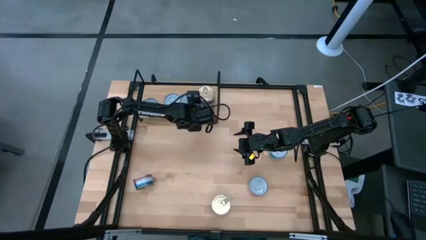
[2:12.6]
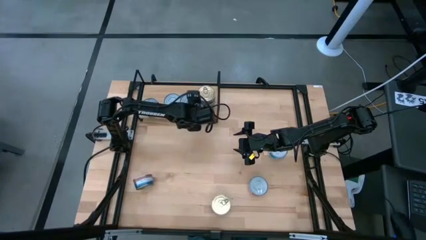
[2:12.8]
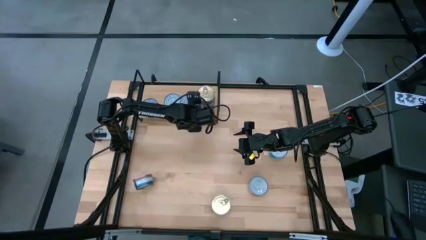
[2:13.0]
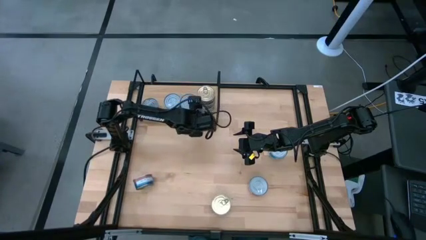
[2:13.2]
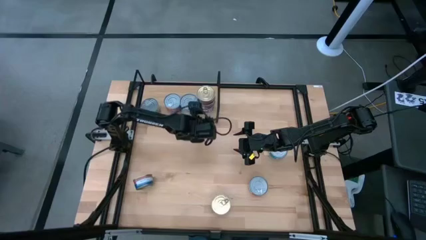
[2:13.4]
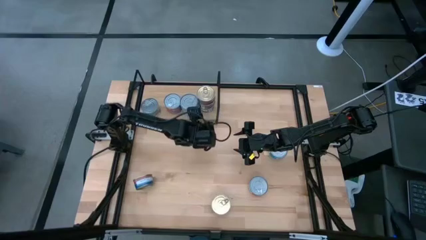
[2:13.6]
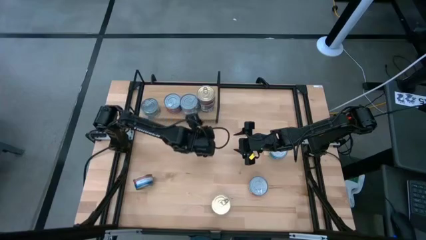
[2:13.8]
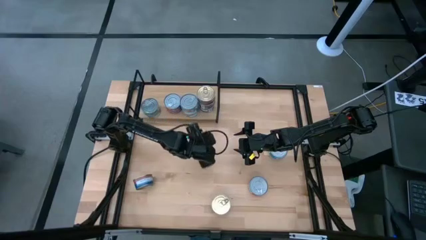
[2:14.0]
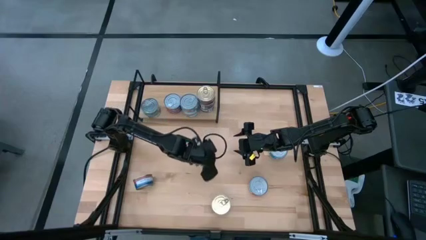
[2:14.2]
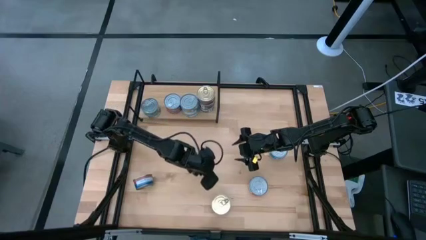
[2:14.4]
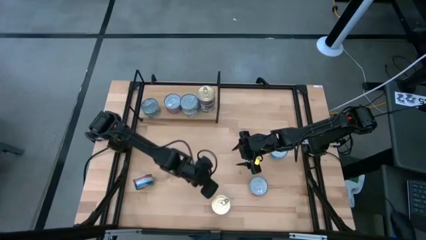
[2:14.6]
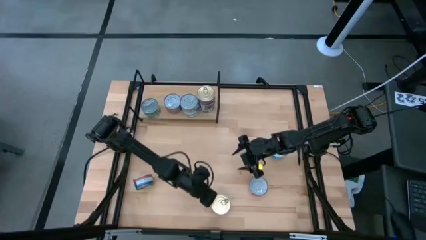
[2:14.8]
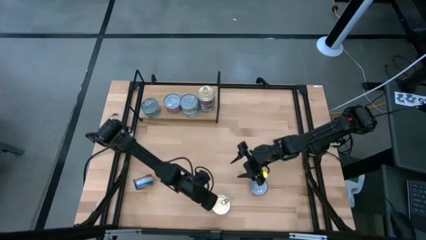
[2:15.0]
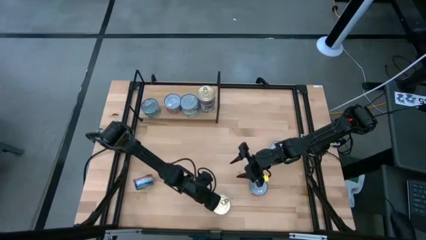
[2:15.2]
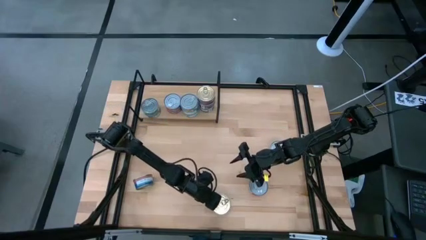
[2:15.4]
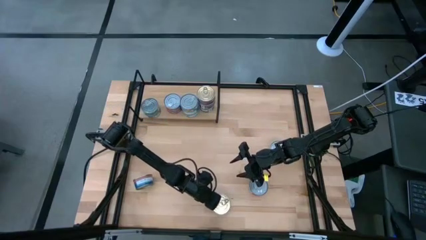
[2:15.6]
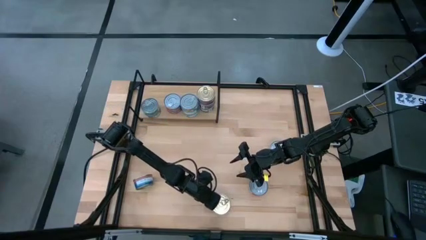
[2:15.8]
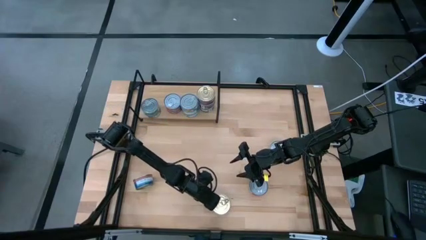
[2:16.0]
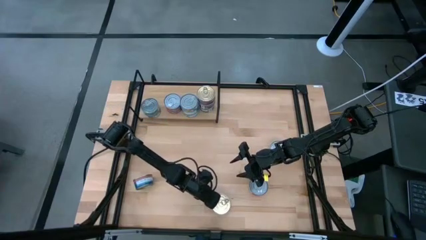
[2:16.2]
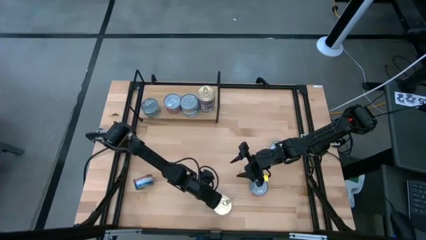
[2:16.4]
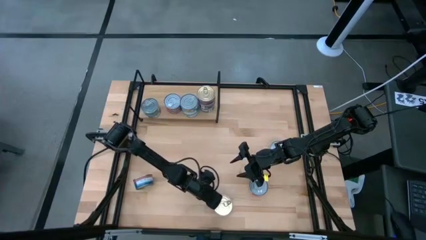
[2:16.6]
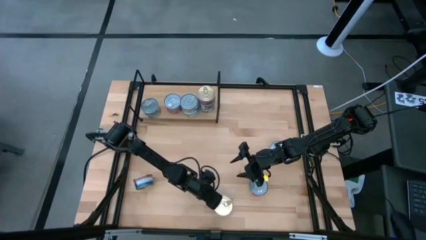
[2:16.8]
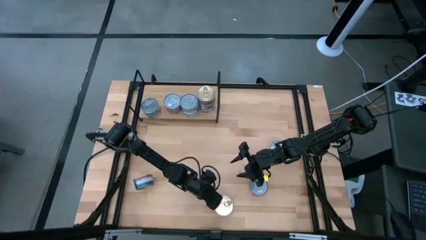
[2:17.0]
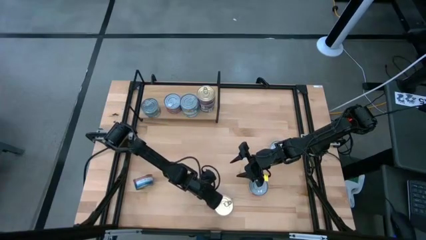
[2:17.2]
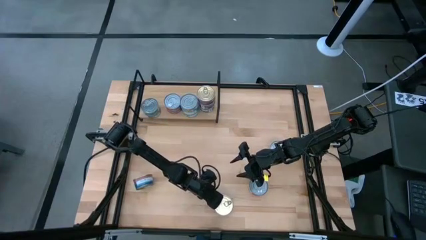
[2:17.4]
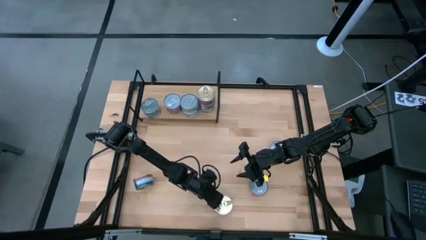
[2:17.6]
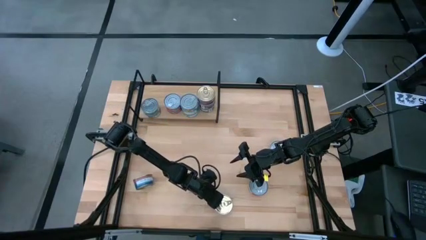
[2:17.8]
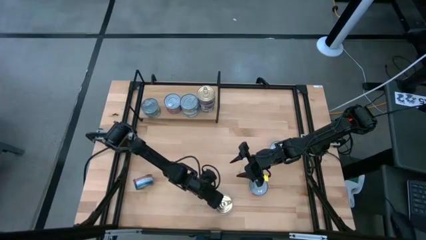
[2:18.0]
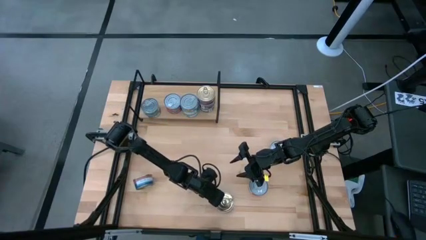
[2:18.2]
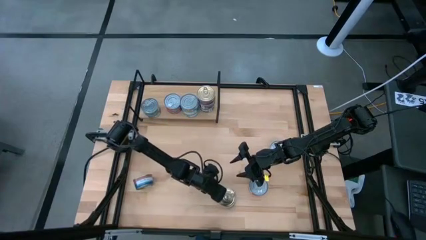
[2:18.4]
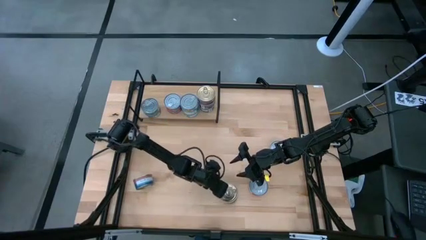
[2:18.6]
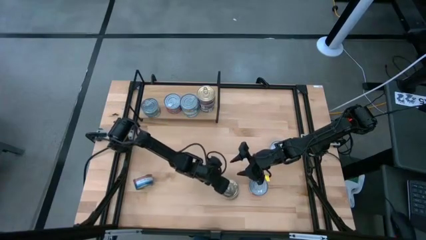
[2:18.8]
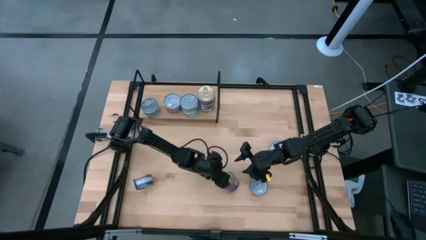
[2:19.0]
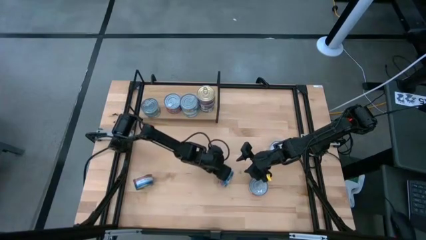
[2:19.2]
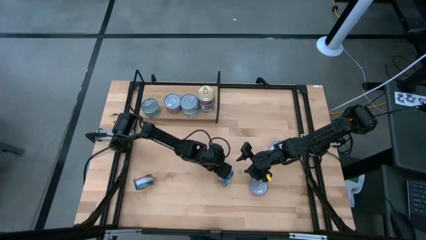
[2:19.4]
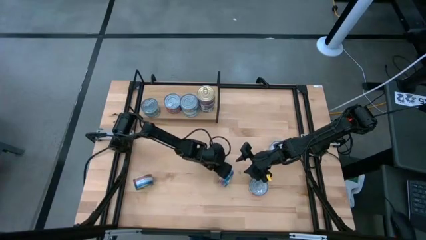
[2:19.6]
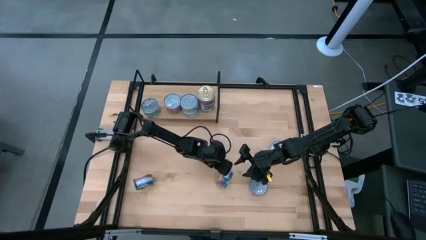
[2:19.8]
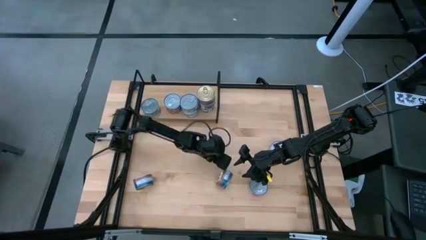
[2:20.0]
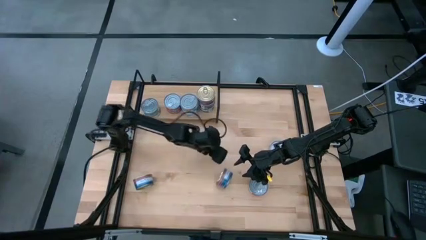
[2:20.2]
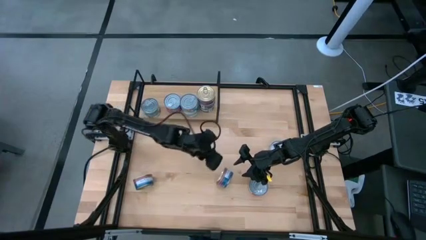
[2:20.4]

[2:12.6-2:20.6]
Task: Stack canned seafood by type on shelf
Stack the blue pink tuna can on top of the blue pink tuna can on the shelf

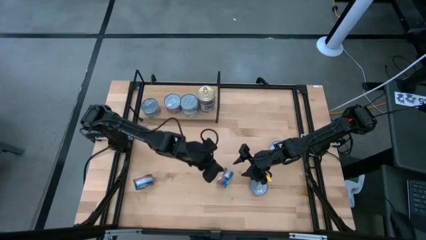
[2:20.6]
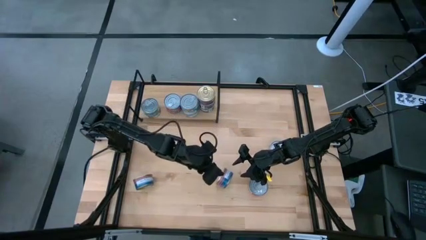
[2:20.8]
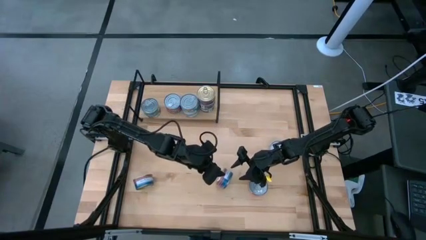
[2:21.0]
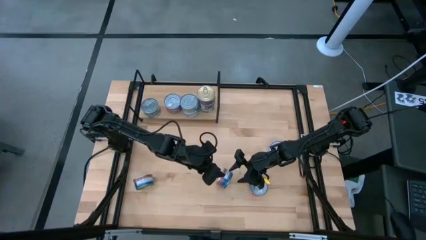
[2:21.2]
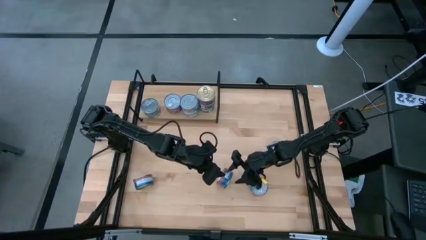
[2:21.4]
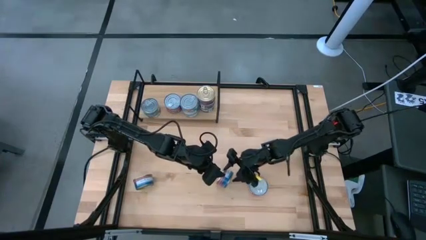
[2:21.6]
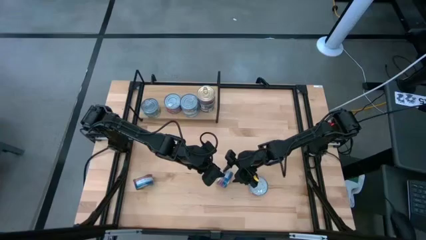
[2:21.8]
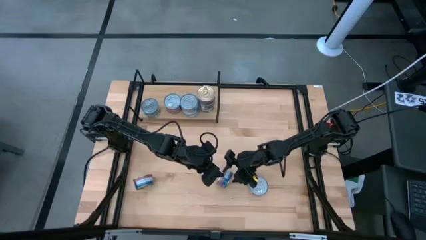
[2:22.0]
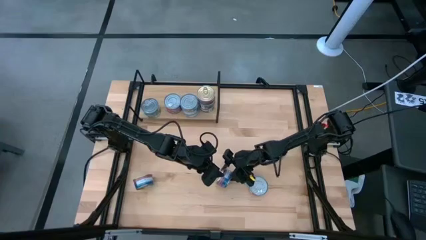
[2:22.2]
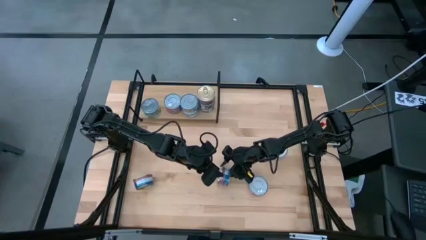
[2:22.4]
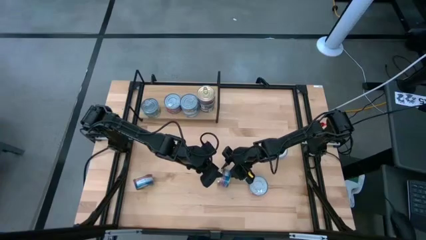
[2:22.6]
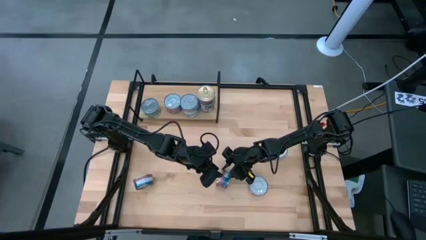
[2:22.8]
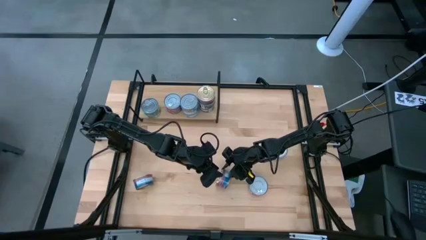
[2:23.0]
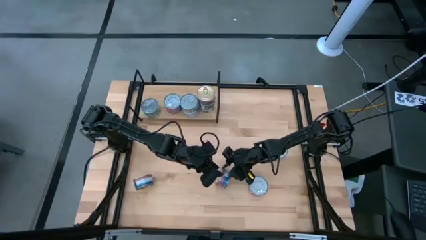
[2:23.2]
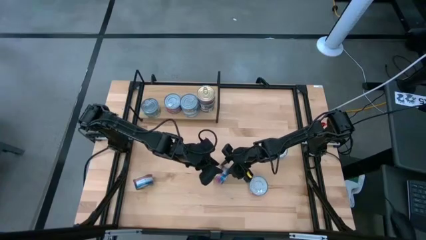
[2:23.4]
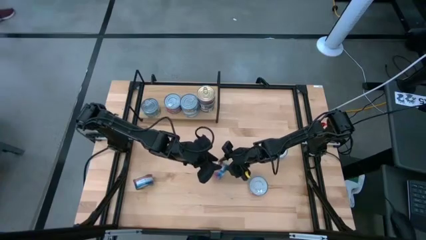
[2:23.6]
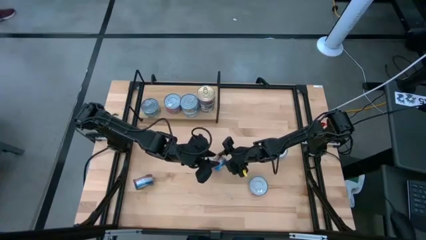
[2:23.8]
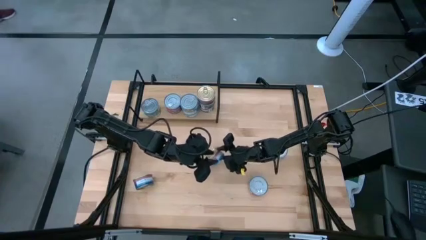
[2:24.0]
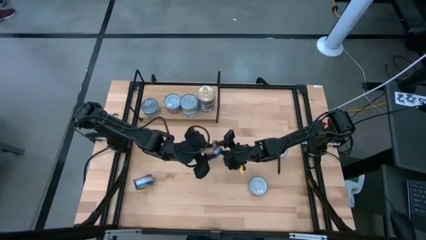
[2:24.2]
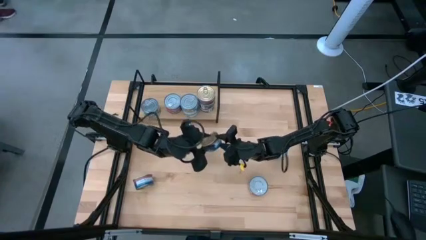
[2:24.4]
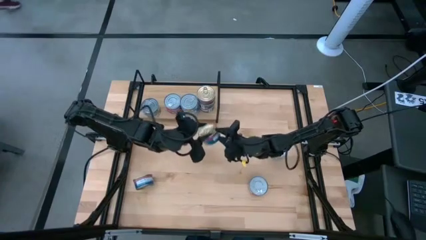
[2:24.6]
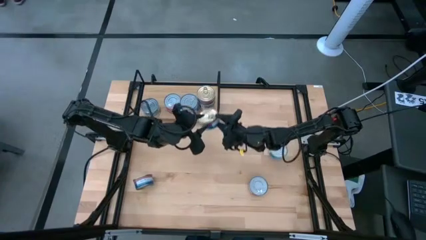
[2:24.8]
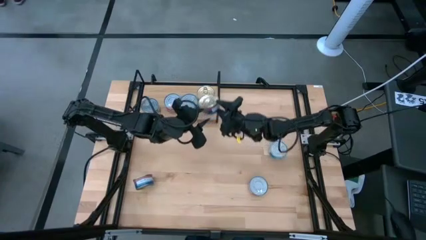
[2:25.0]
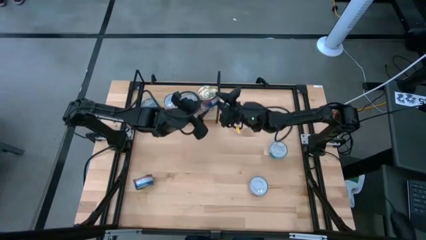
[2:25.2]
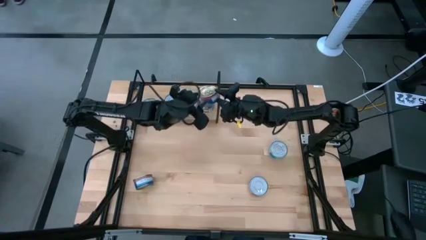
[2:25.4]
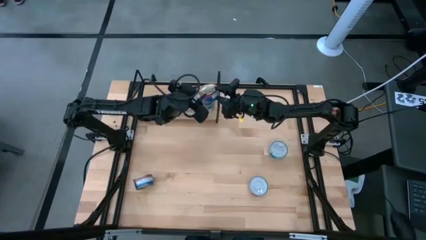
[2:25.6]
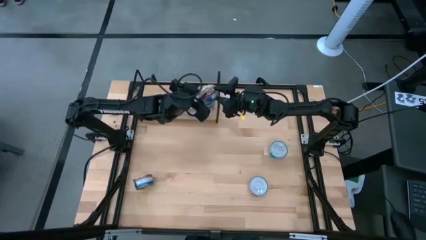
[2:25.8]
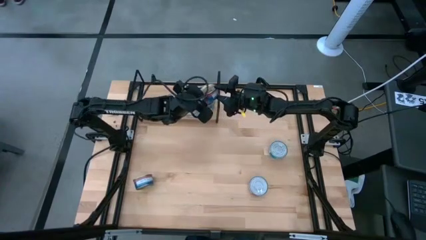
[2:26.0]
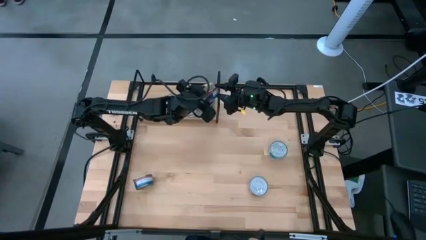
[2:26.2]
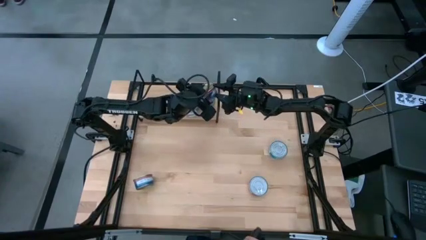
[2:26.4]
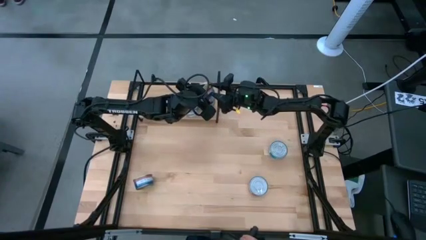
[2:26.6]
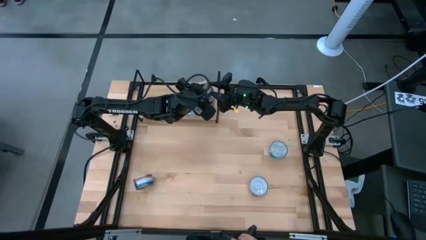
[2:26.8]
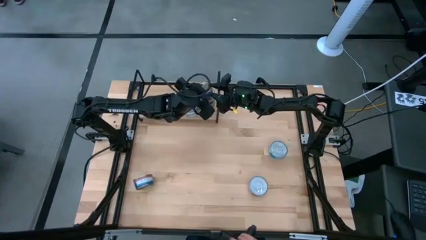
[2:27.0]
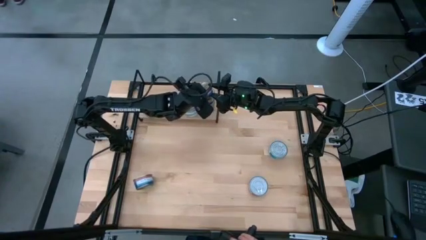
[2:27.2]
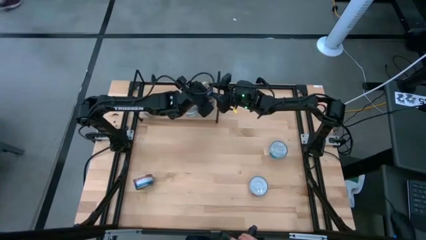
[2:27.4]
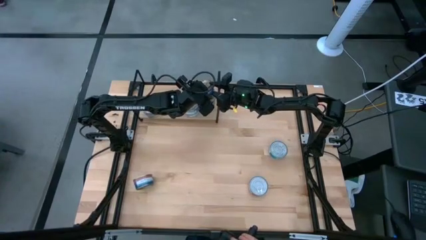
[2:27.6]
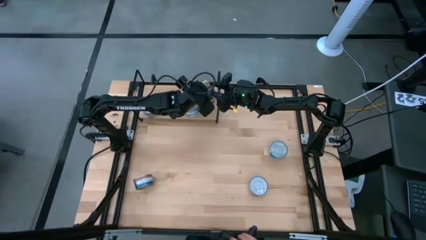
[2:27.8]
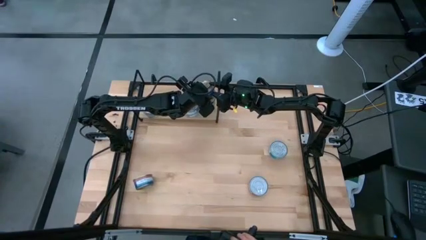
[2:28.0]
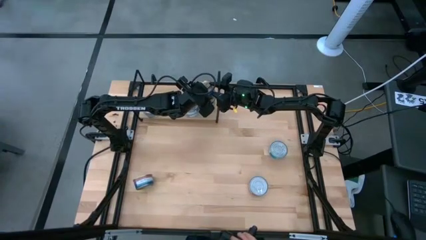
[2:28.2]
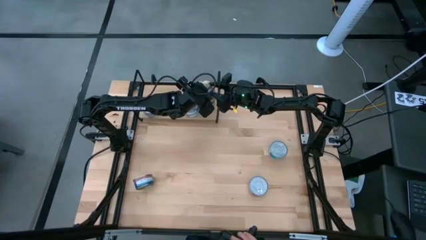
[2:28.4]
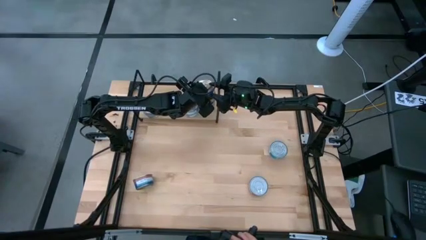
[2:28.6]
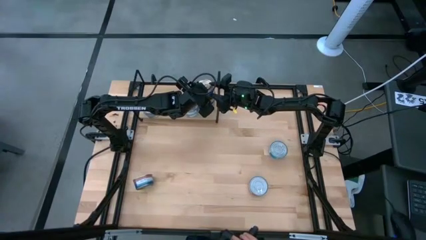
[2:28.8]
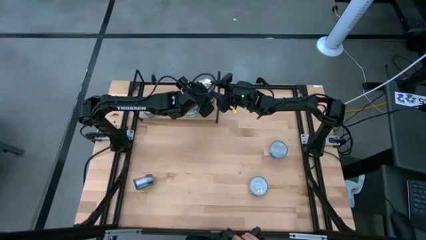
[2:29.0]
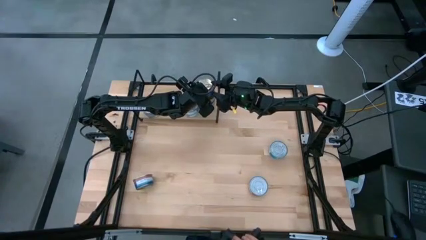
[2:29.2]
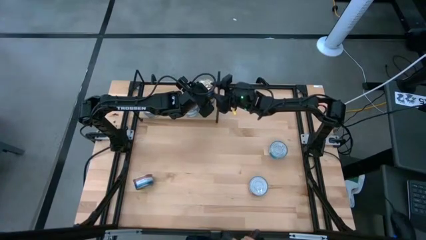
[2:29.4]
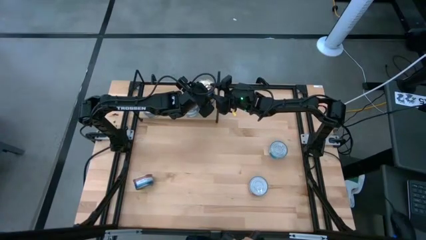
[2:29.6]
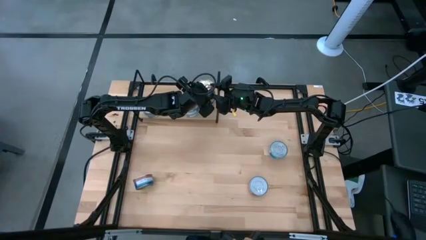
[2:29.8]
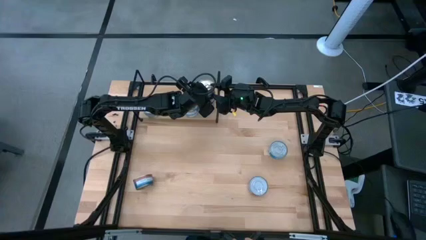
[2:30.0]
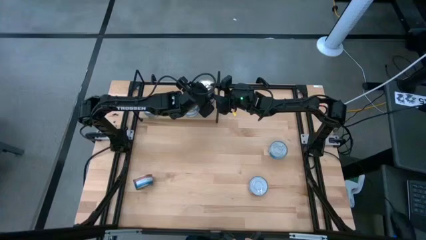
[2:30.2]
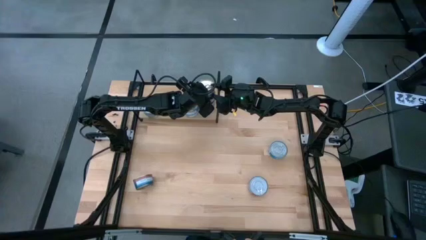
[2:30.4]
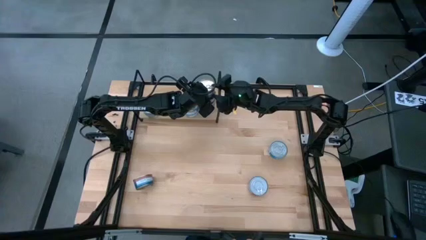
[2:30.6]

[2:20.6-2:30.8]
Stack the blue pink tuna can on top of the blue pink tuna can on the shelf
